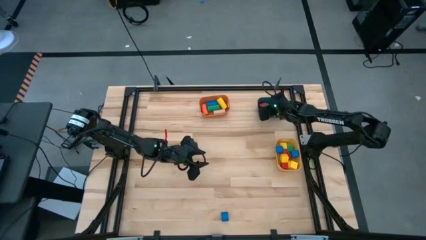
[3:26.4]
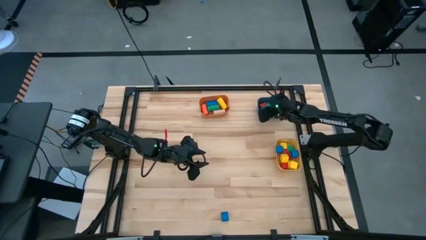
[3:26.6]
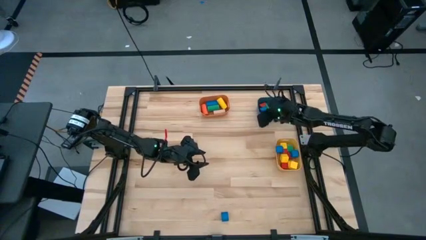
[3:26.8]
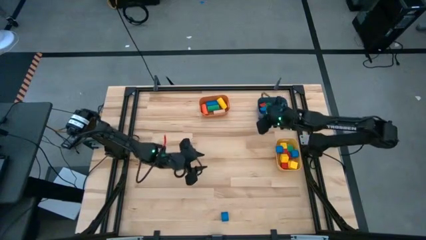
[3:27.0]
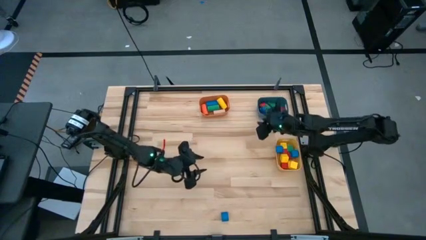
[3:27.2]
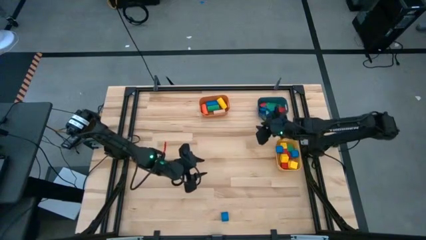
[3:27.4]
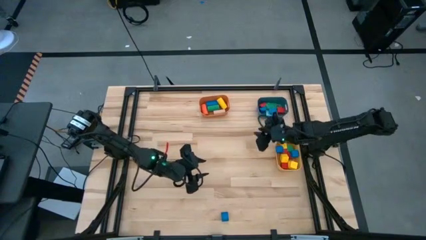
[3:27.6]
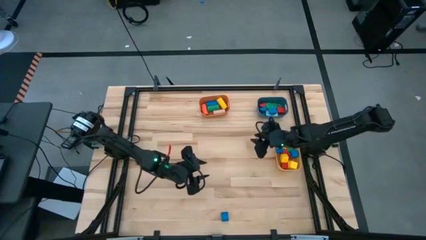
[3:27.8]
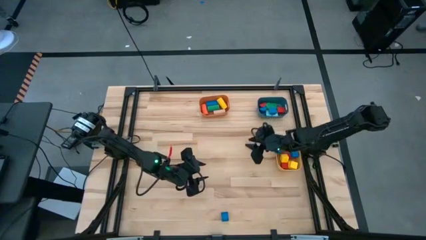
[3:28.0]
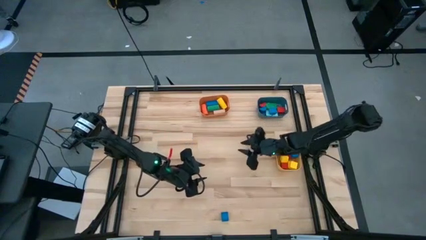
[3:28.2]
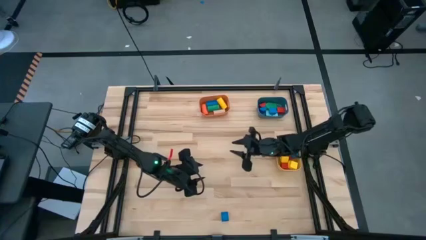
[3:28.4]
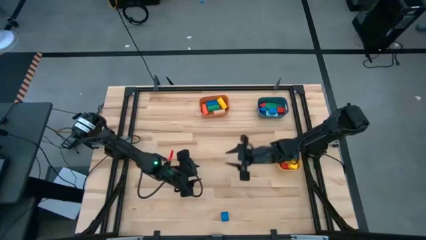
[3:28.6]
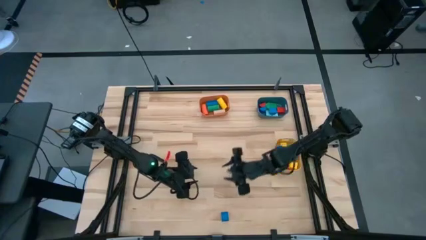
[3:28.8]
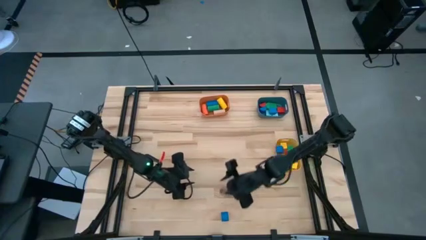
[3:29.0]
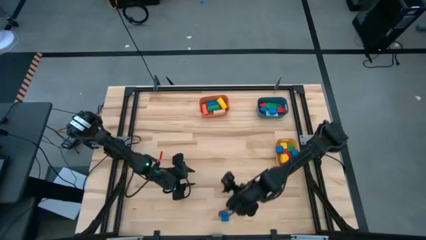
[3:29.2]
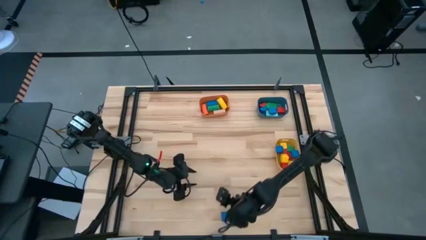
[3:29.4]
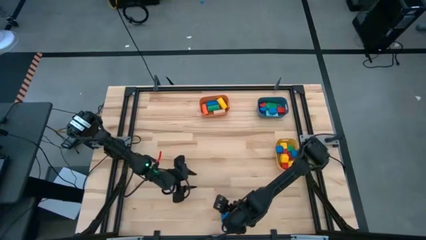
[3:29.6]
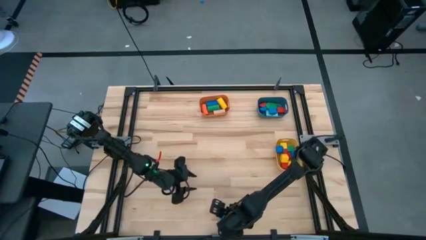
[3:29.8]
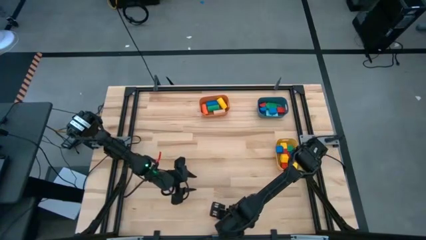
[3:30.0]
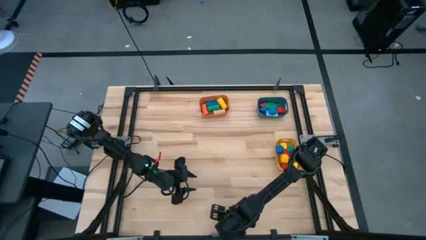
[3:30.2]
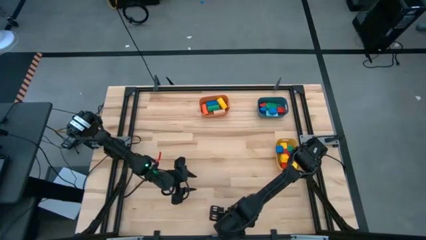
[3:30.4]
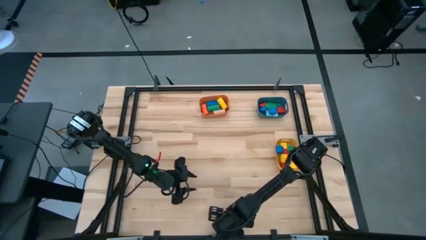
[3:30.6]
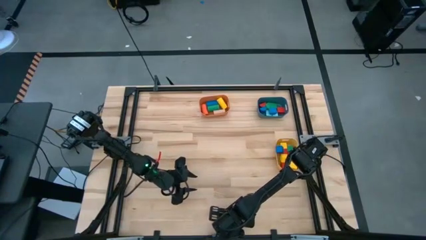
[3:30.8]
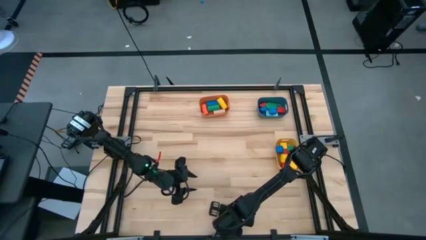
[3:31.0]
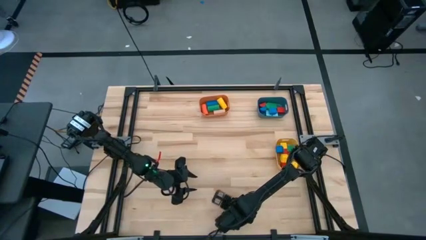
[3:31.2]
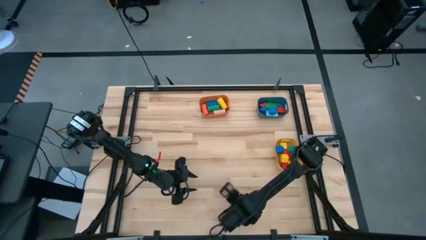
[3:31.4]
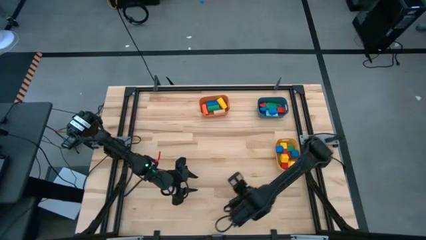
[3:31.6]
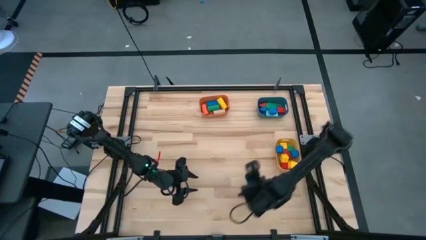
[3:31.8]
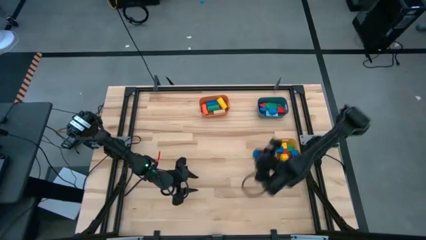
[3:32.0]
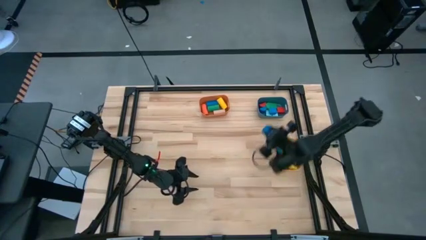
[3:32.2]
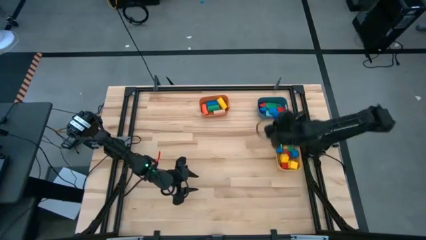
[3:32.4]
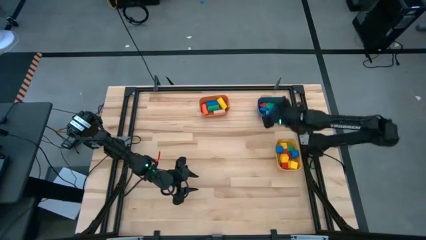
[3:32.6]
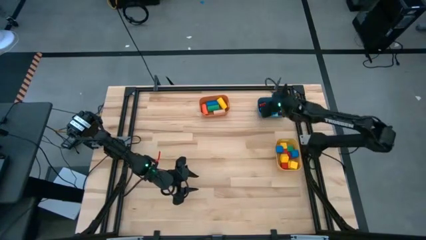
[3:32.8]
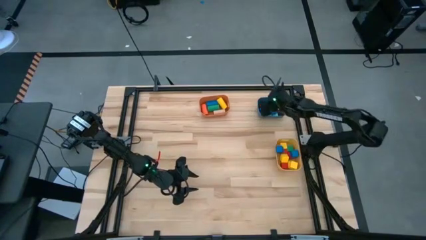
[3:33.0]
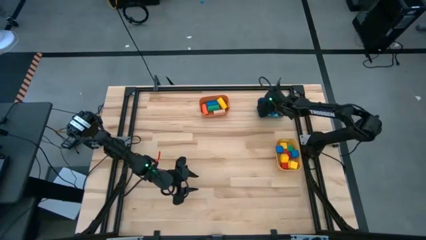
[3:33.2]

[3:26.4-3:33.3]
Task: Sort blocks by size
Put the blue half circle block into the blue bin

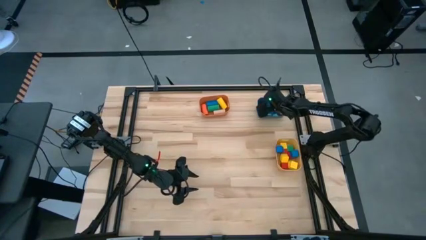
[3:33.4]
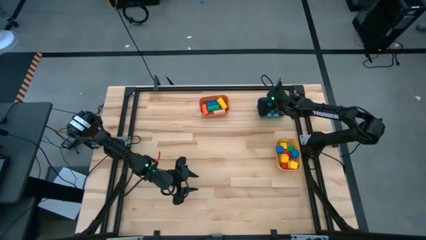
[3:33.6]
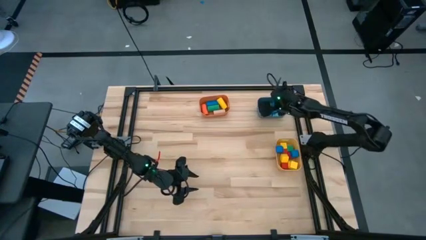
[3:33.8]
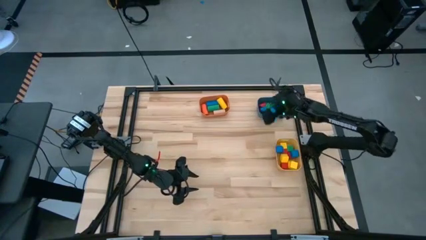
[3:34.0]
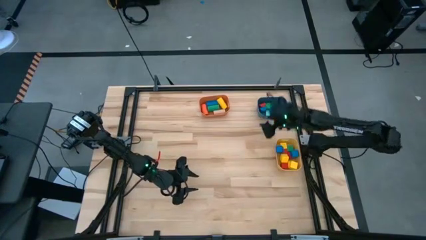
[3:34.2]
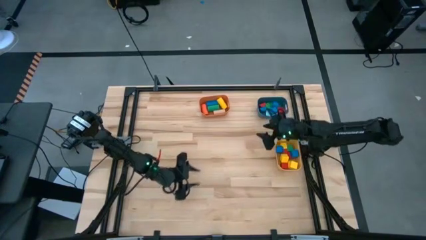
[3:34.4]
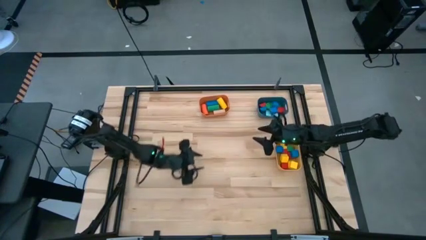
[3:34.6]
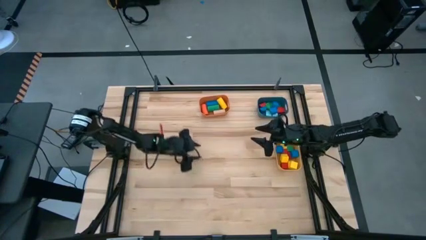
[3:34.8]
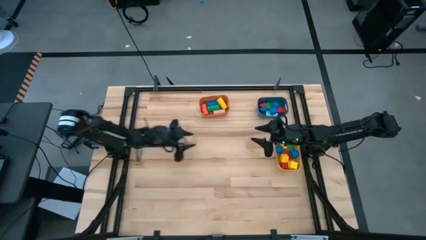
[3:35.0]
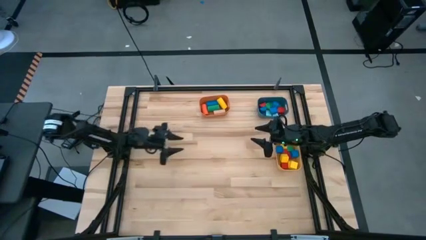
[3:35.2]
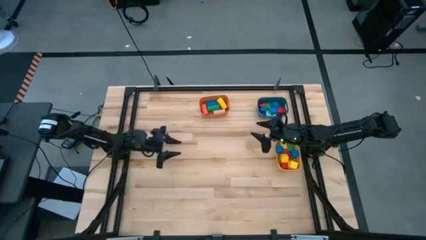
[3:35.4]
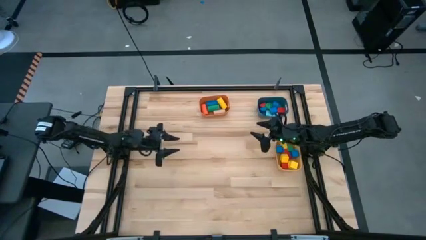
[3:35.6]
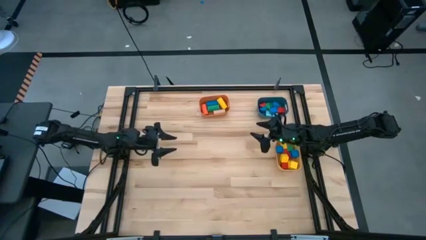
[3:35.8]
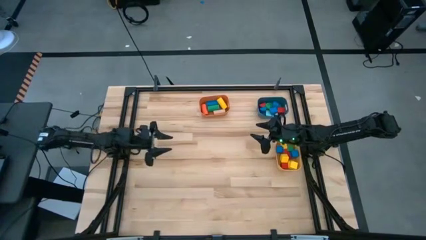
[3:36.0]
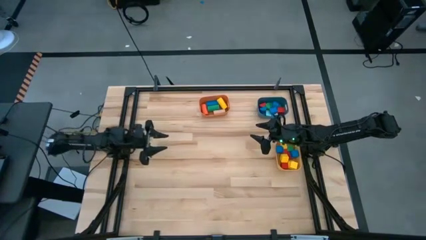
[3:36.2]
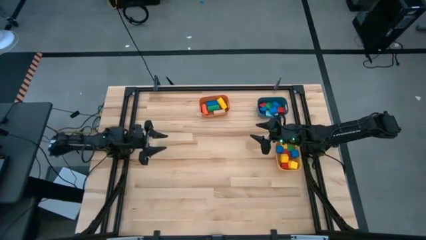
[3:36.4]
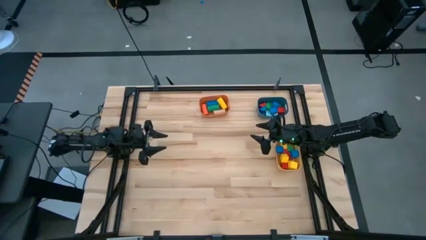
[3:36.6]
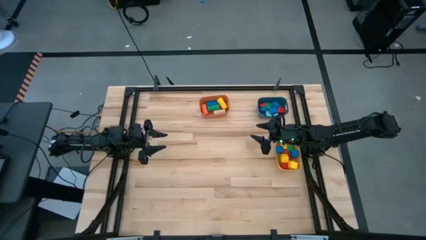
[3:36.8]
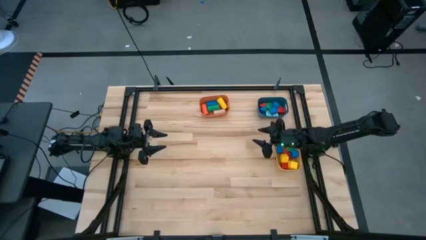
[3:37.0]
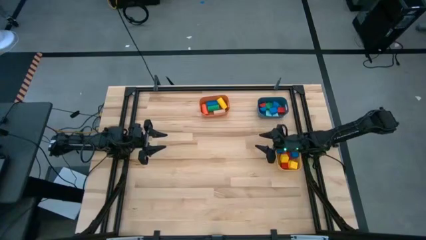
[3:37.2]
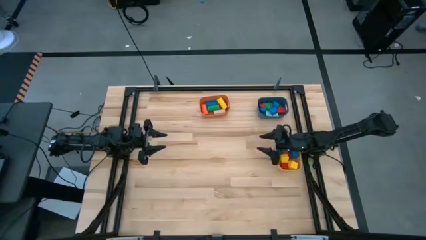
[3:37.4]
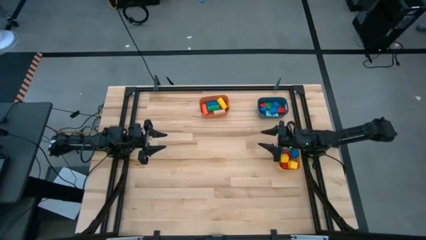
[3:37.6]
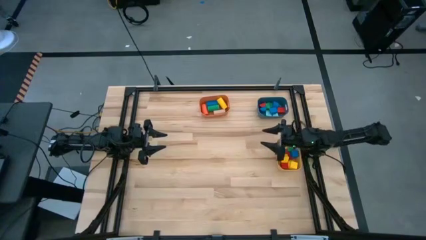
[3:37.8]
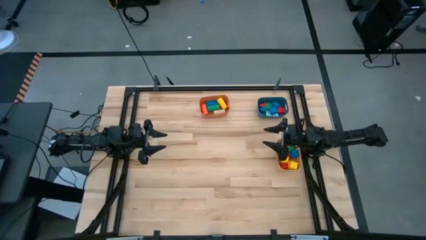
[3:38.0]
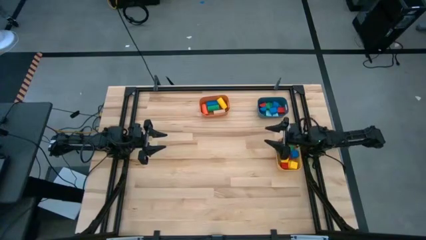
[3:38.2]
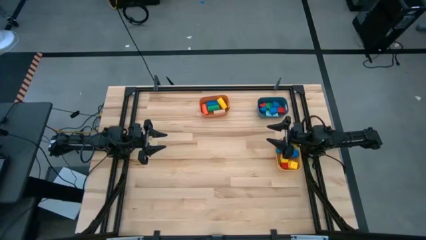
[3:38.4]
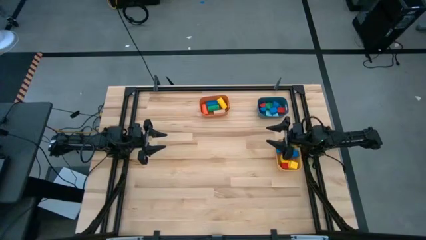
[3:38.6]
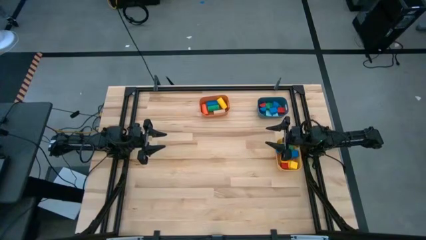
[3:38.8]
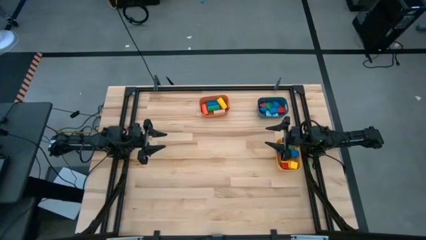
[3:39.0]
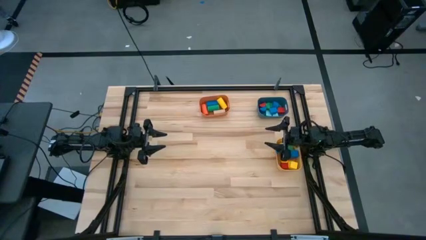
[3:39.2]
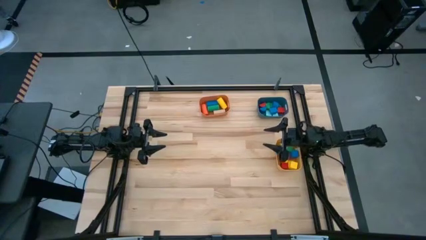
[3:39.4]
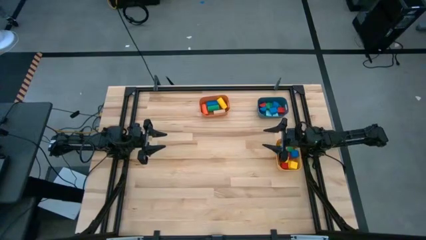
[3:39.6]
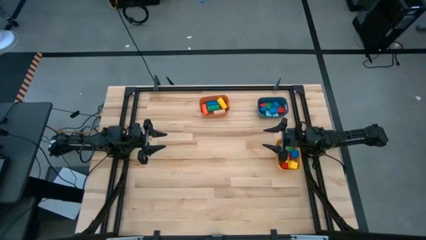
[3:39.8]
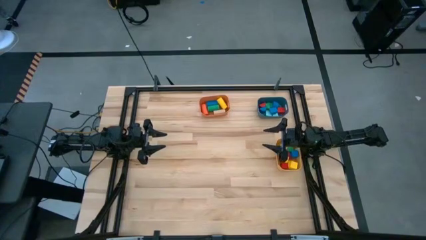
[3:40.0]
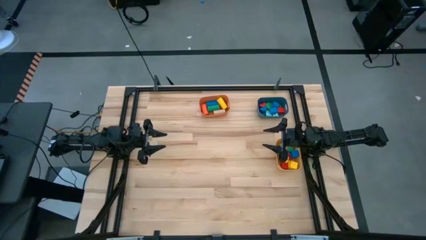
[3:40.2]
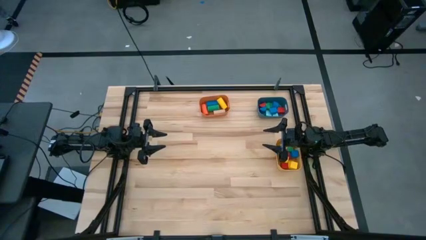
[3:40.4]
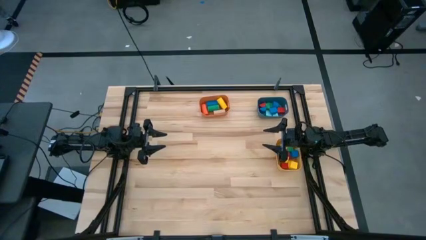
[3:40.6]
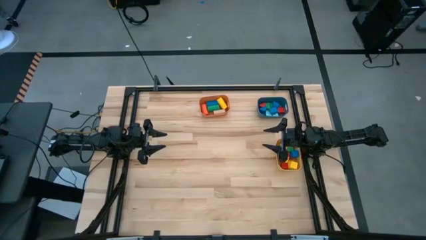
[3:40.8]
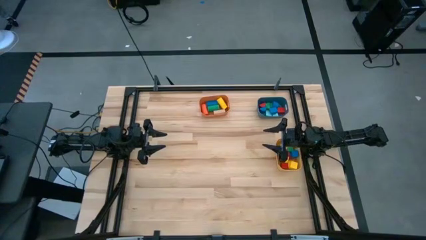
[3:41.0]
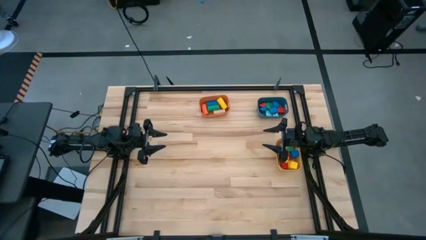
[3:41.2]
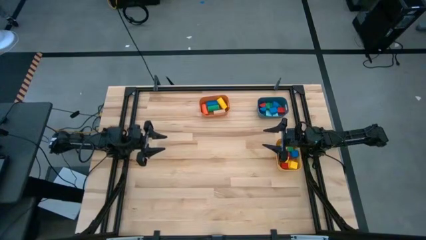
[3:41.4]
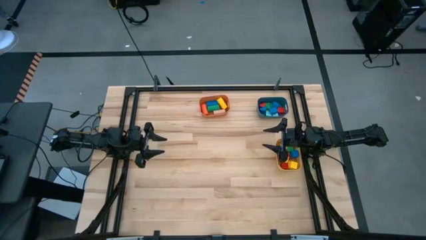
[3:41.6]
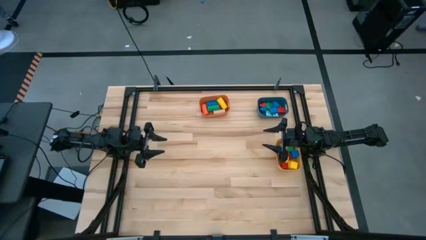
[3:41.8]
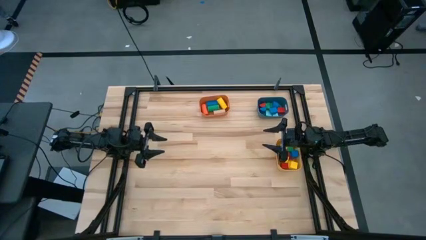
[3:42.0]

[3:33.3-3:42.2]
Return to Home Position
